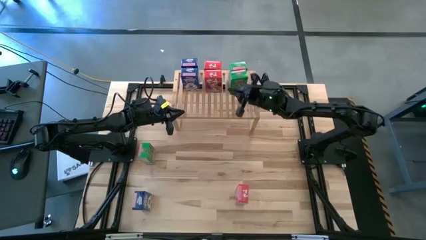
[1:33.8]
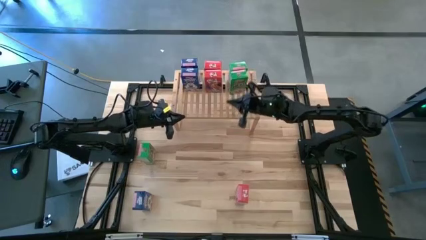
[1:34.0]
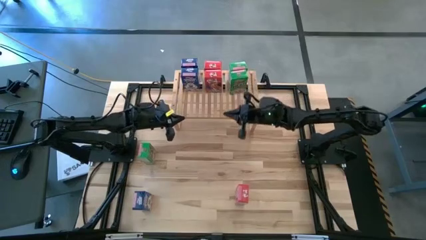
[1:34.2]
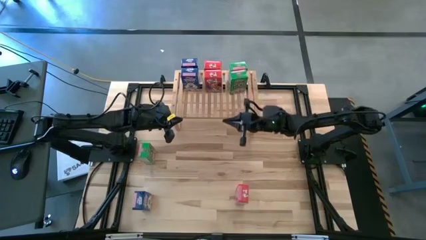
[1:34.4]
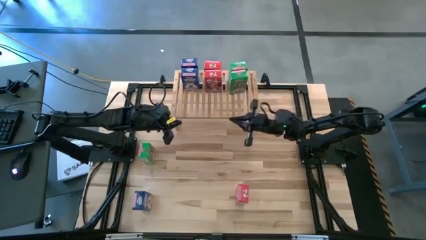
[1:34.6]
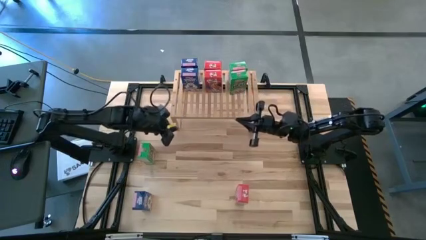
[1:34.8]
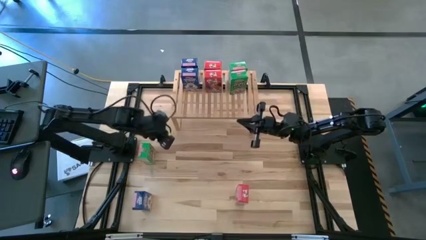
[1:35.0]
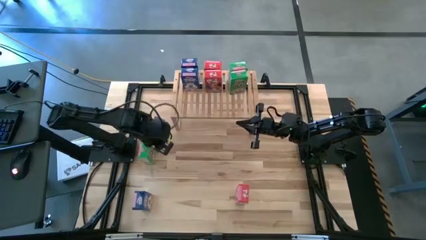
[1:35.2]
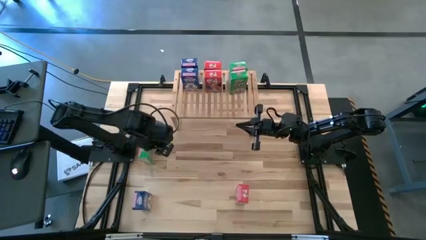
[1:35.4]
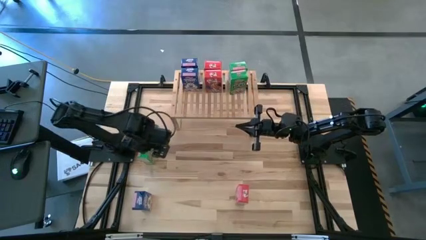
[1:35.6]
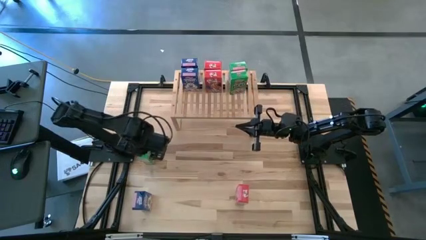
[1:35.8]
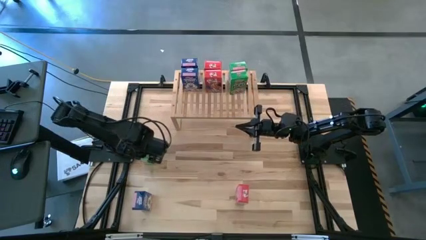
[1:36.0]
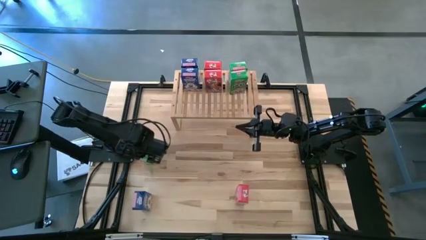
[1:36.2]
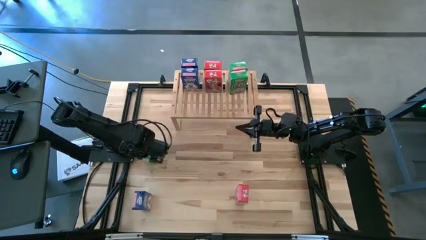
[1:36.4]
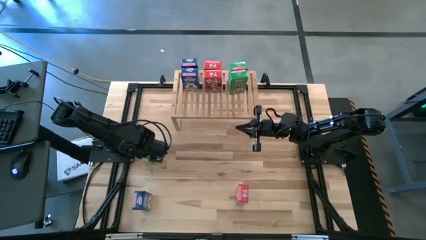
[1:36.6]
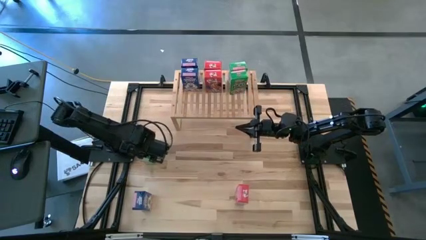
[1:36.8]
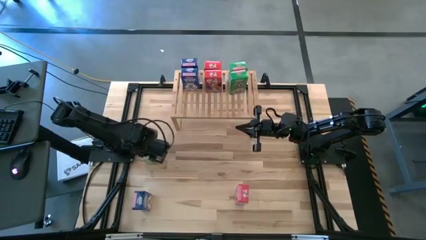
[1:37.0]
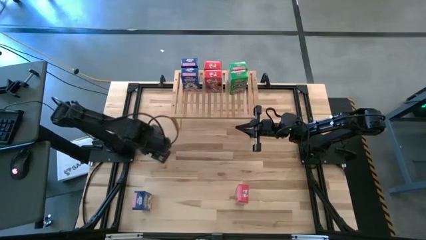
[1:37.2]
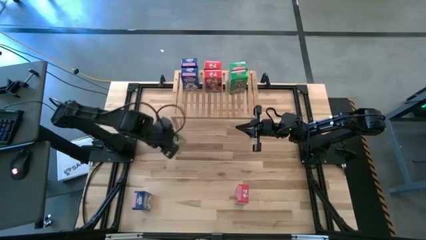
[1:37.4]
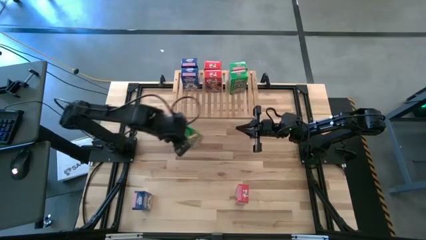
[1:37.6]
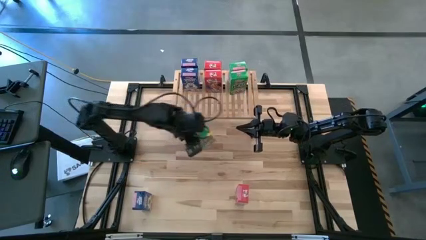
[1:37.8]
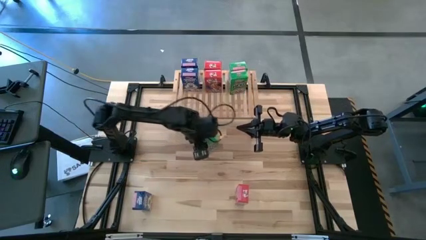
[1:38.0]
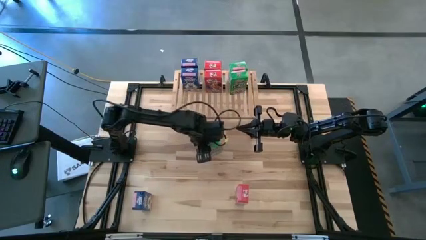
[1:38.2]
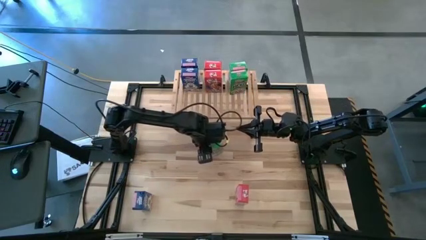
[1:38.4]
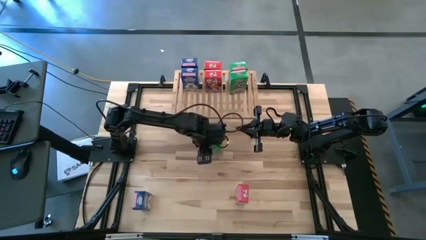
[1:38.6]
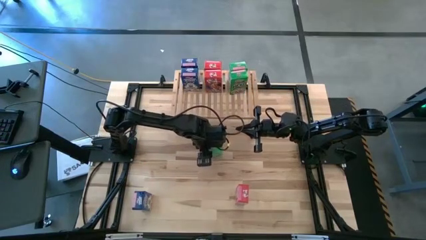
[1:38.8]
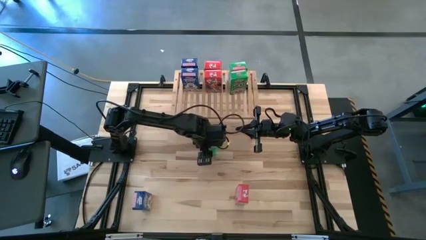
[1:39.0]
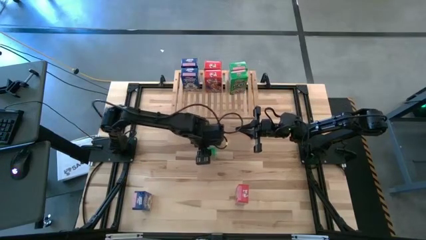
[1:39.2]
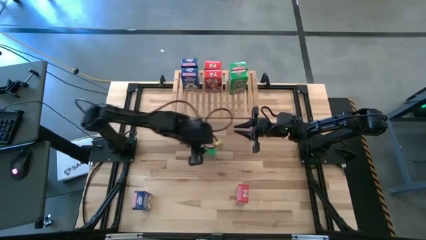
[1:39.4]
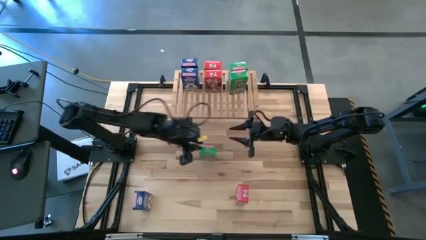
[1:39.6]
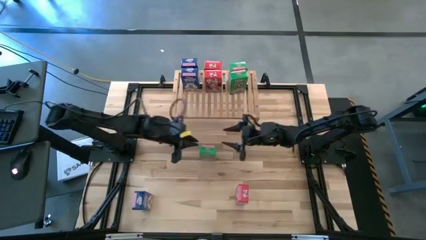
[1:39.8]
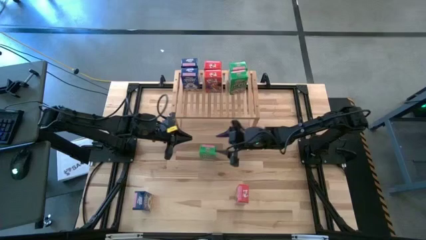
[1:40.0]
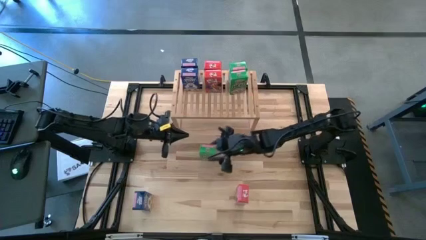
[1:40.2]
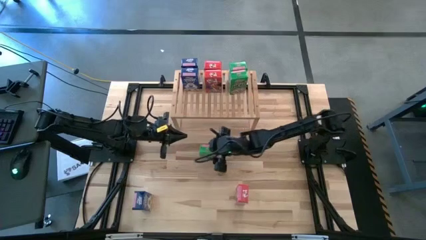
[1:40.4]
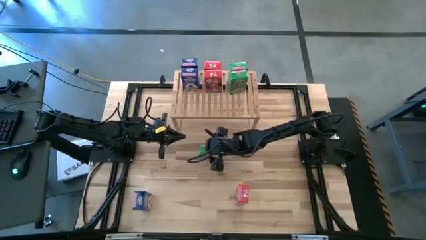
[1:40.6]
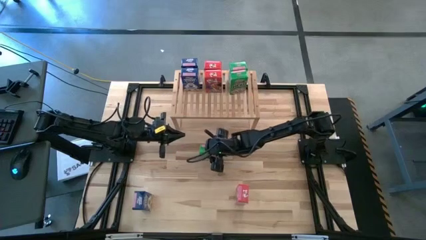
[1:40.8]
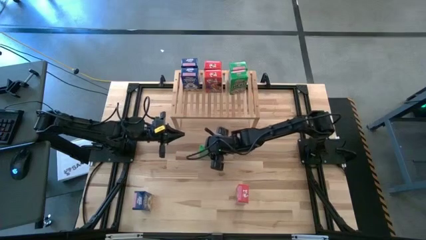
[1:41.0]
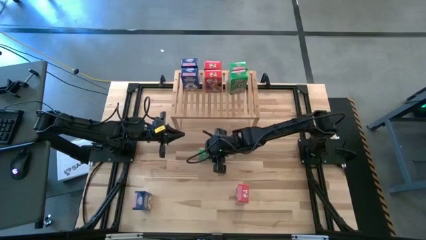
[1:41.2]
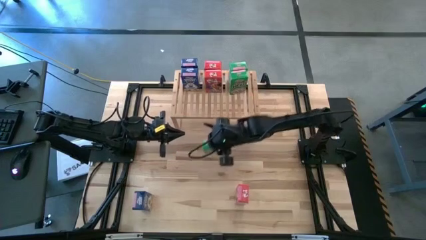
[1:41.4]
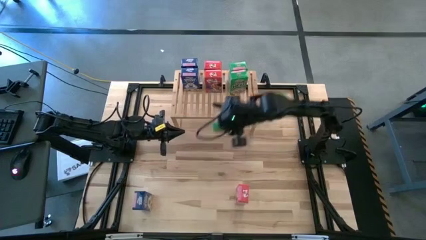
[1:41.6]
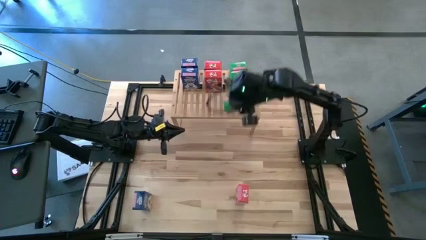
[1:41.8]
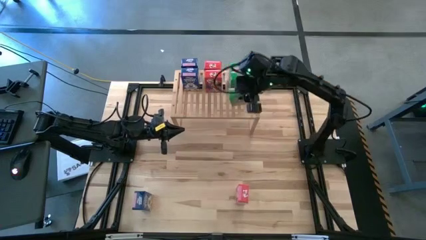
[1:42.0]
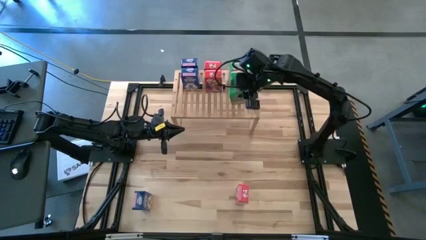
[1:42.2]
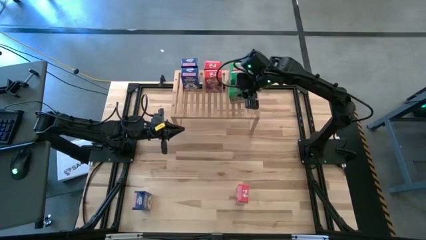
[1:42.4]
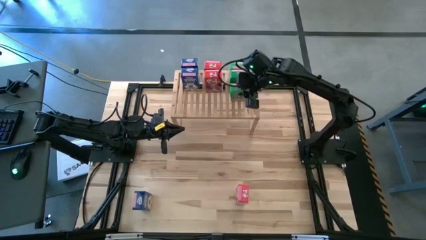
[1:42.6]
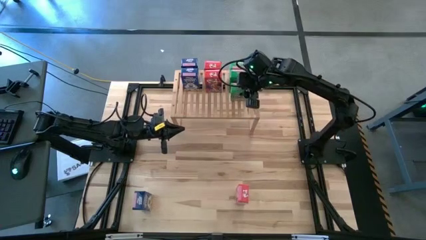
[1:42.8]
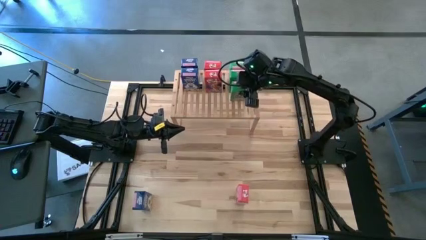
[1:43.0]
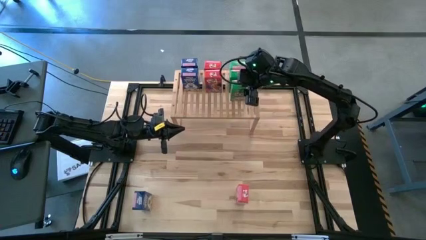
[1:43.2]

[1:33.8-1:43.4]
Task: Stack cereal on shelf
Put the green cereal box on the shelf aligned with the other green cereal boxes

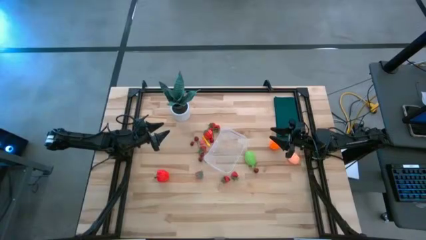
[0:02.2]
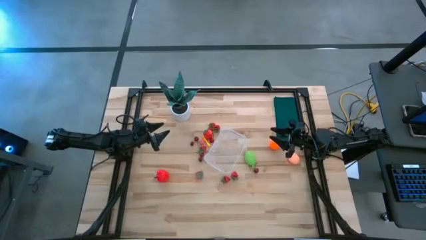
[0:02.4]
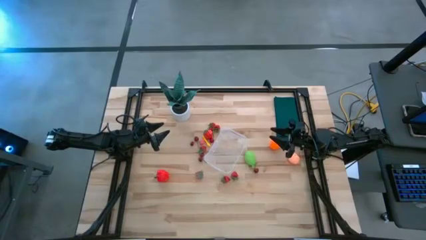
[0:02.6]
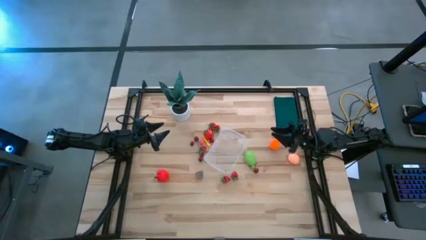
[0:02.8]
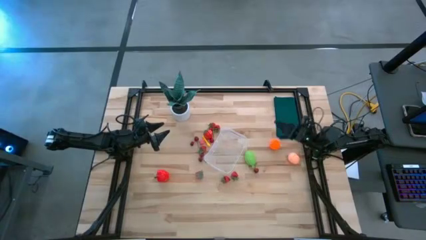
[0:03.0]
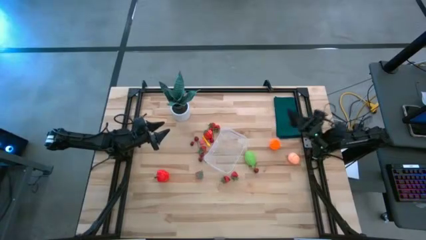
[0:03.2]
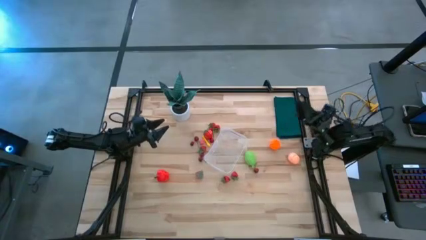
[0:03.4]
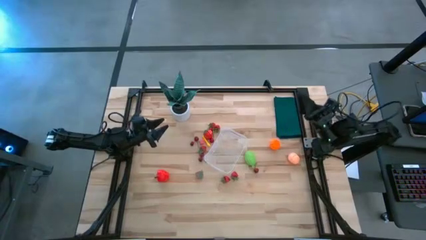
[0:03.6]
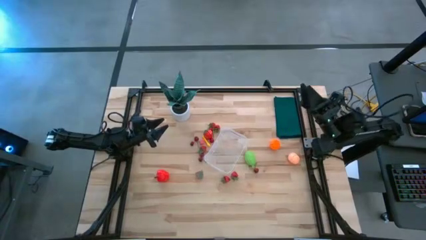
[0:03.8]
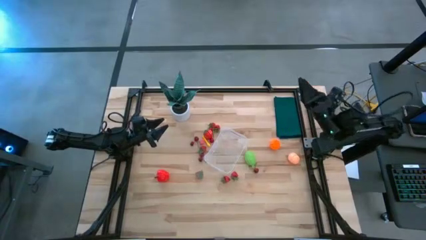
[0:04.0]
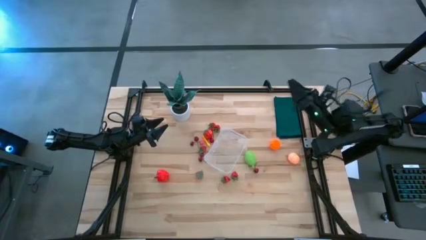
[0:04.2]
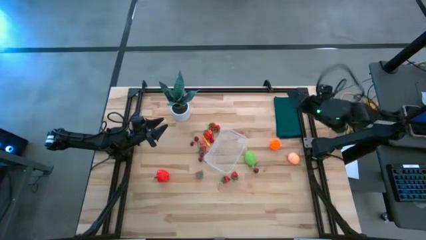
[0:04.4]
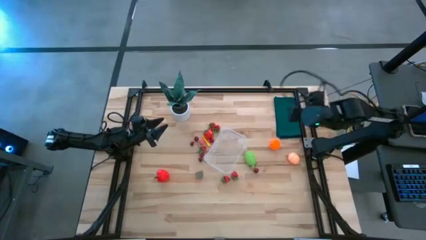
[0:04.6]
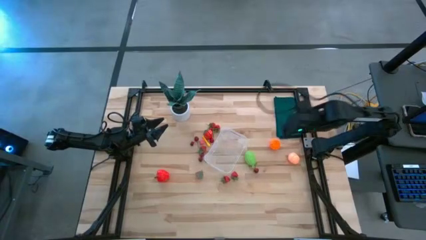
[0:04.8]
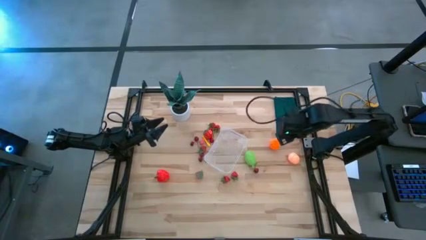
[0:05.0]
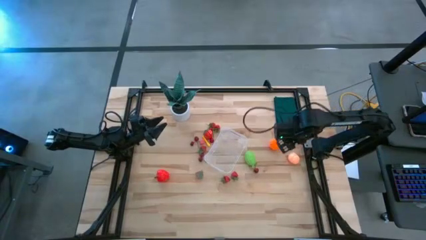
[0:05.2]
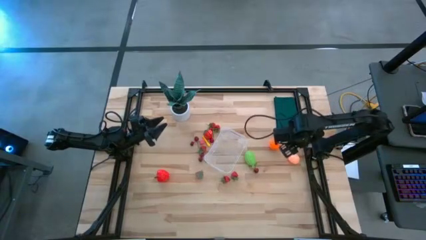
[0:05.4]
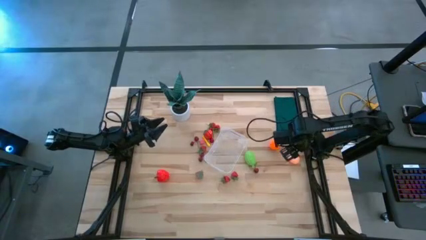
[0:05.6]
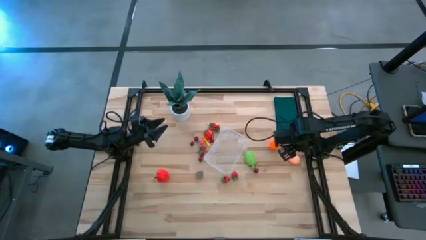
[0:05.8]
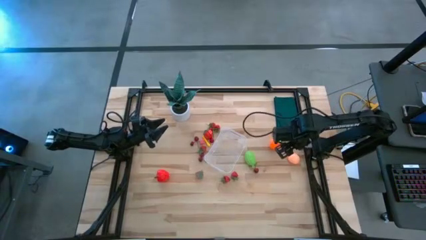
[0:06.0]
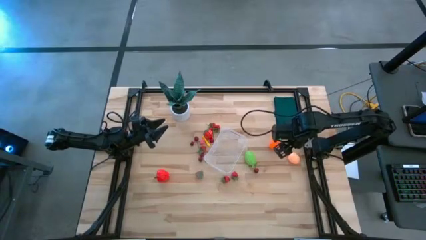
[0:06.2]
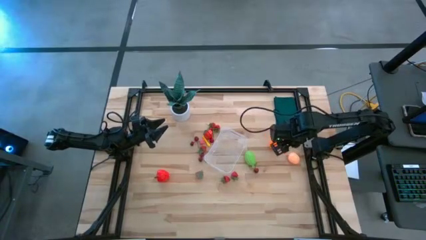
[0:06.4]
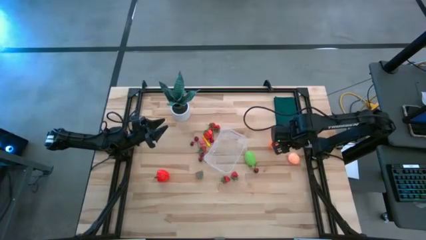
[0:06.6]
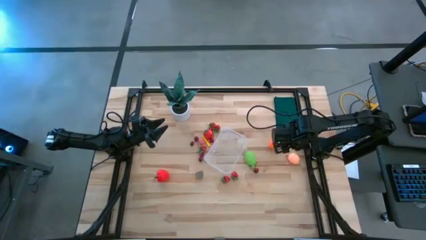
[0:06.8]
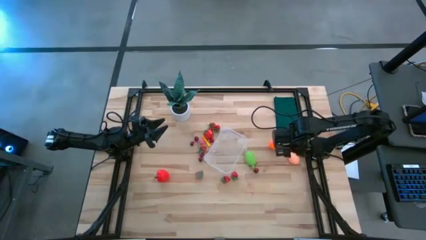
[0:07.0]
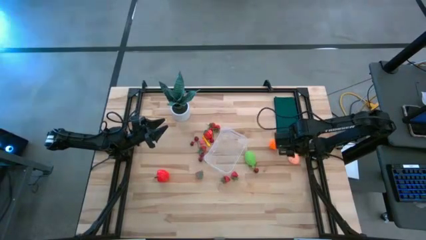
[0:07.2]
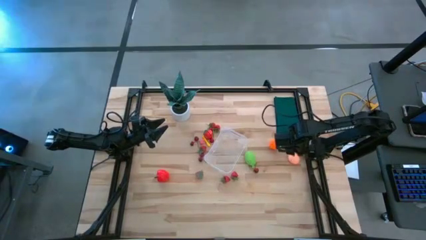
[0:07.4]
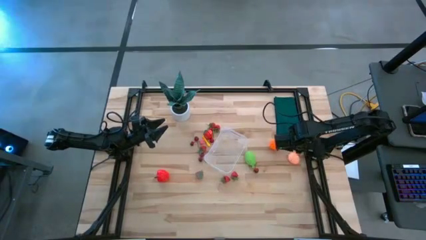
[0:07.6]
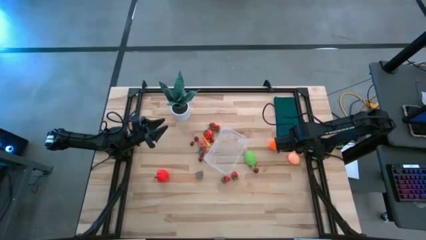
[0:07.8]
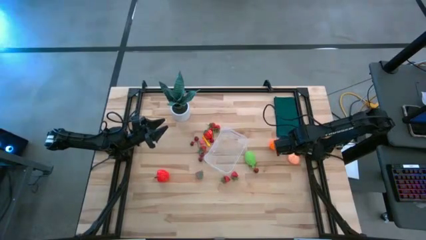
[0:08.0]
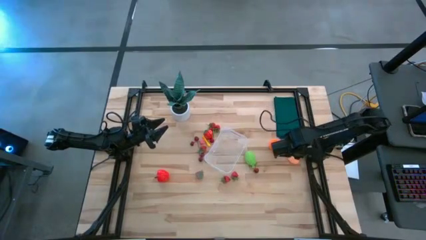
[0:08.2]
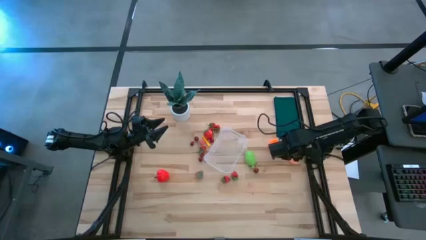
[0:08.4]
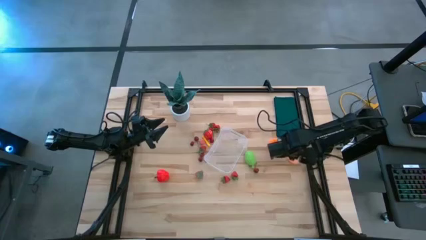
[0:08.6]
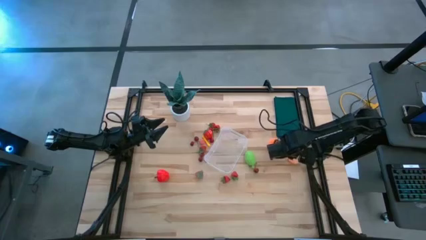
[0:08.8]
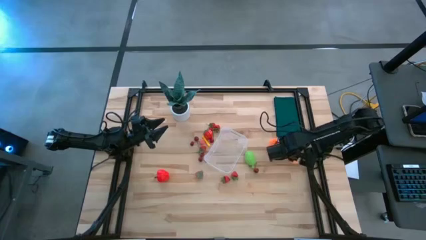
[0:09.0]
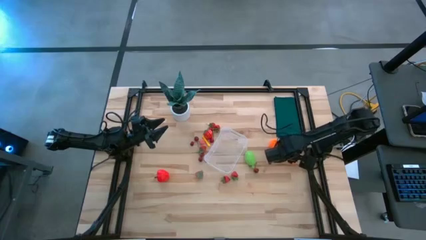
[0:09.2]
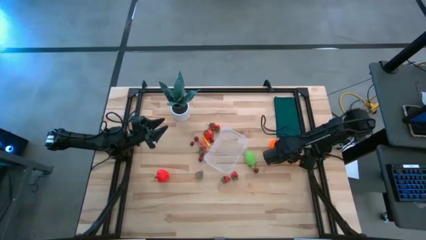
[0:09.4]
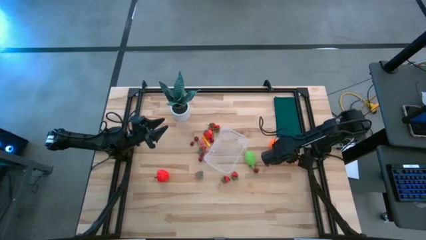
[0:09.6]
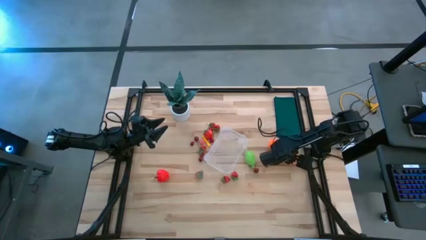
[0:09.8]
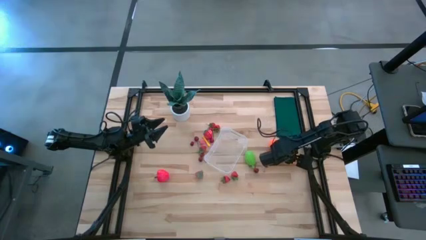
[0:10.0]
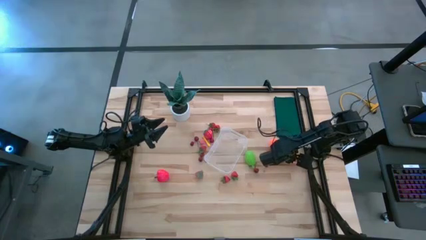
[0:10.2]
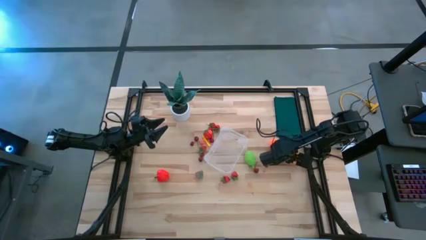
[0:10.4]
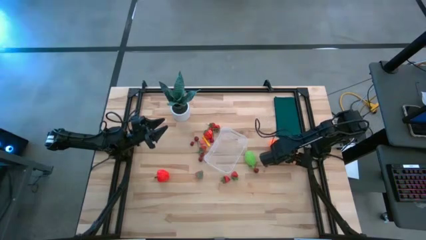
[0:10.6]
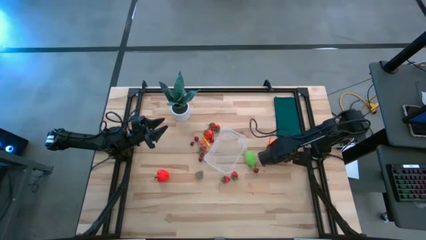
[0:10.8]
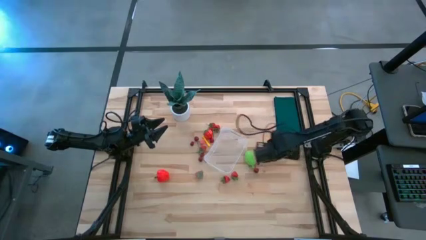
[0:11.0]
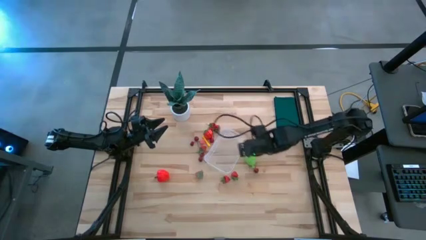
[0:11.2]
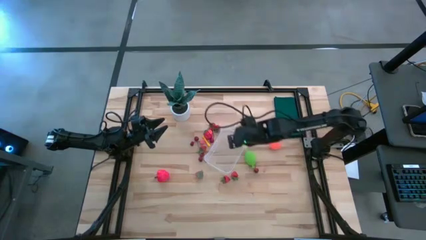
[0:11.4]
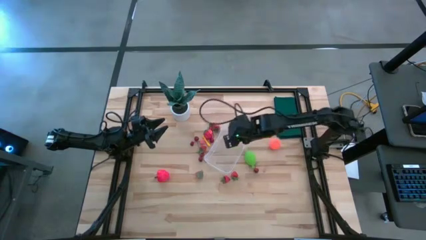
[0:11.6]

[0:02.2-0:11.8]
Task: Pick and placing Produce into tupperware
Put the pink peach into the container
